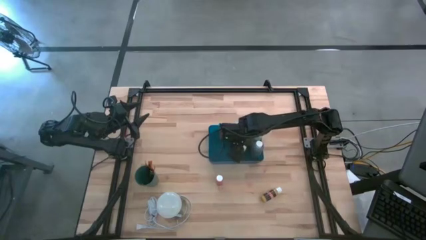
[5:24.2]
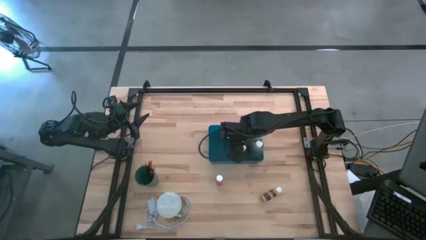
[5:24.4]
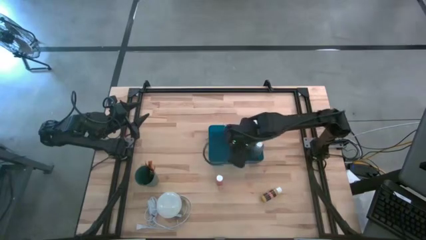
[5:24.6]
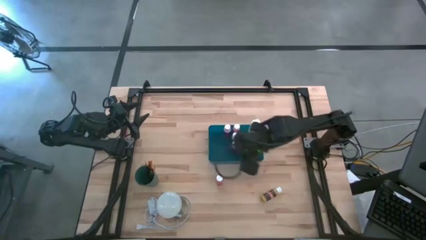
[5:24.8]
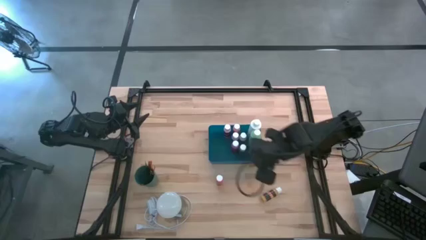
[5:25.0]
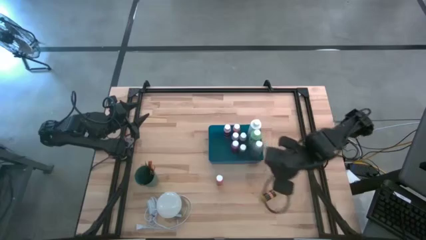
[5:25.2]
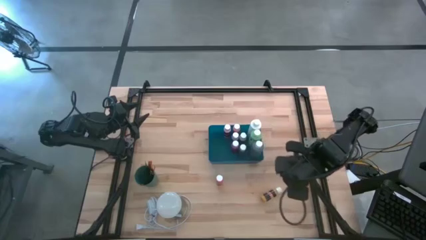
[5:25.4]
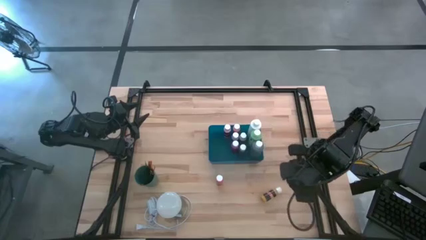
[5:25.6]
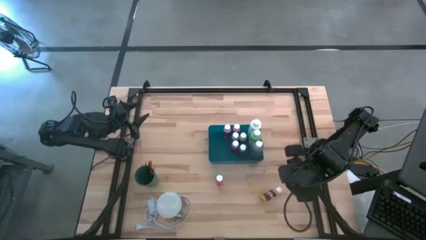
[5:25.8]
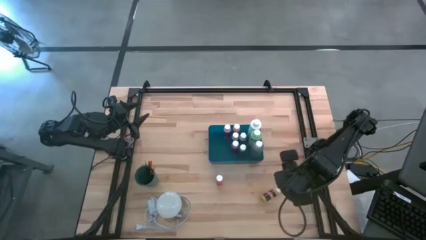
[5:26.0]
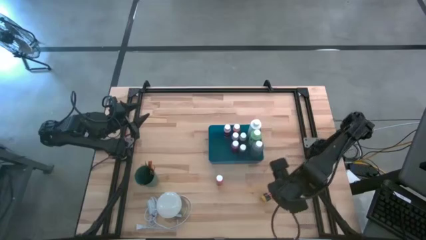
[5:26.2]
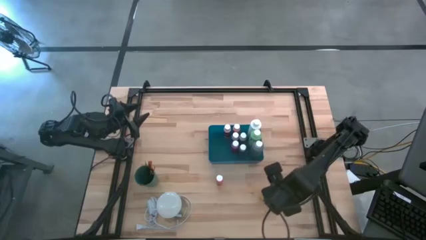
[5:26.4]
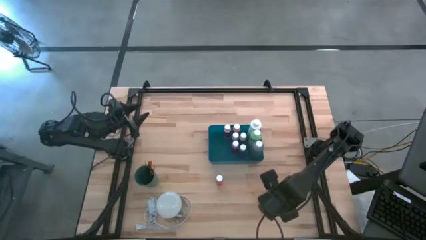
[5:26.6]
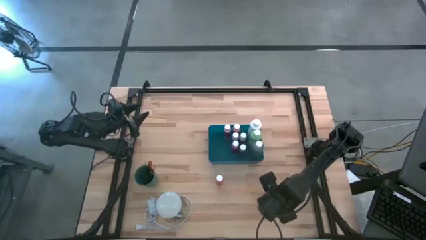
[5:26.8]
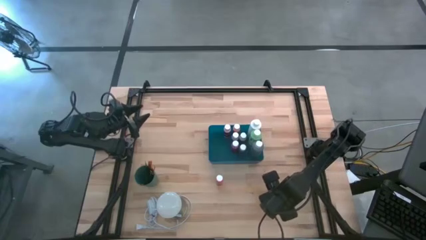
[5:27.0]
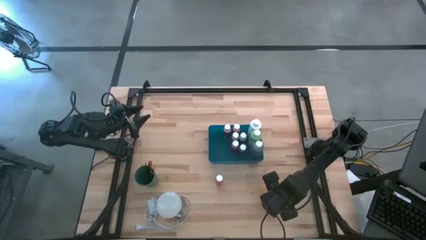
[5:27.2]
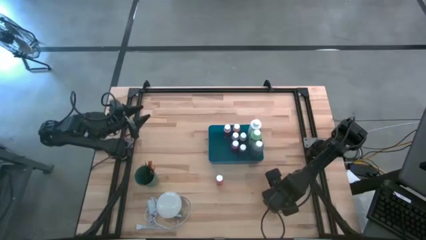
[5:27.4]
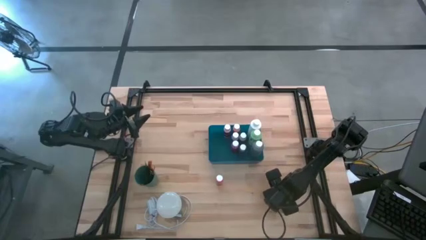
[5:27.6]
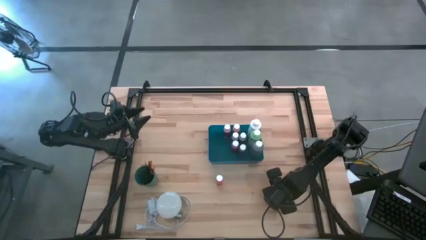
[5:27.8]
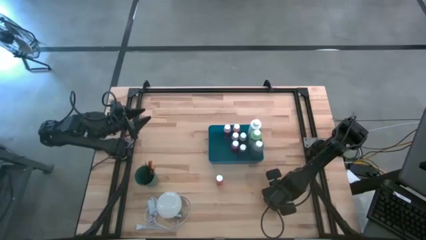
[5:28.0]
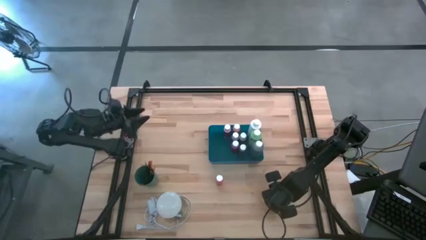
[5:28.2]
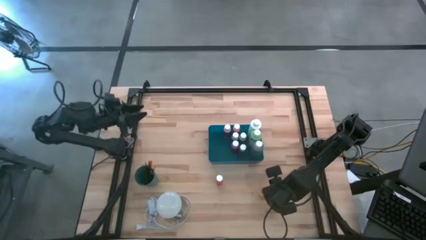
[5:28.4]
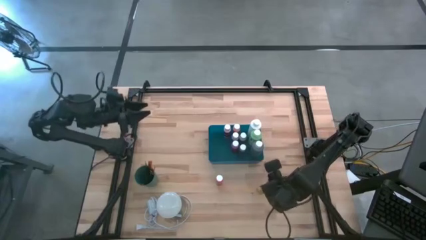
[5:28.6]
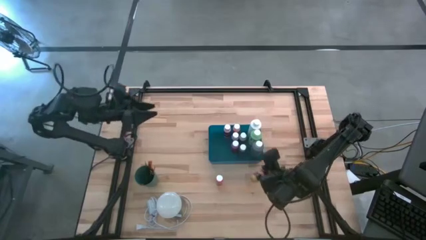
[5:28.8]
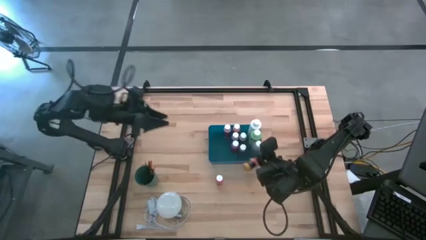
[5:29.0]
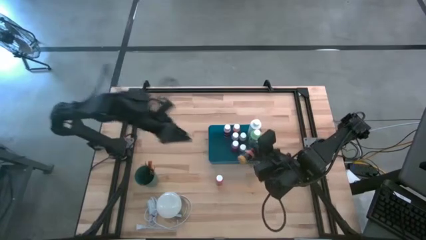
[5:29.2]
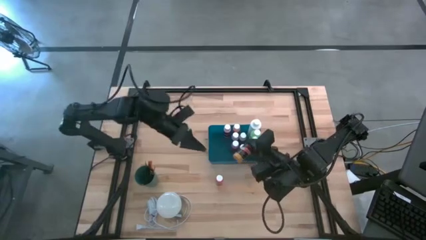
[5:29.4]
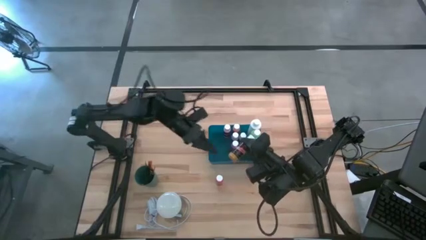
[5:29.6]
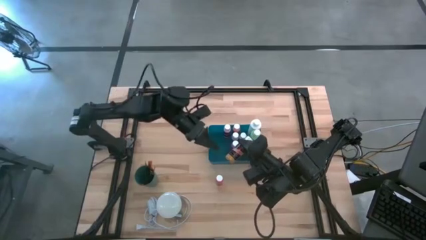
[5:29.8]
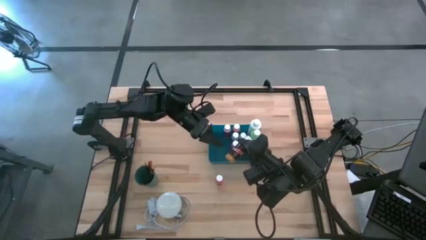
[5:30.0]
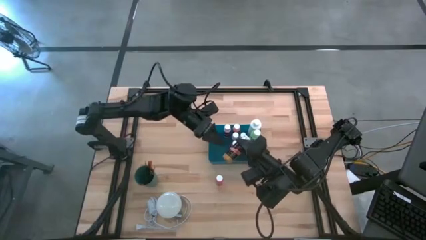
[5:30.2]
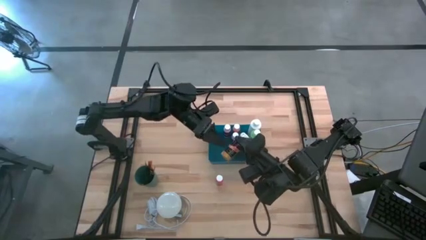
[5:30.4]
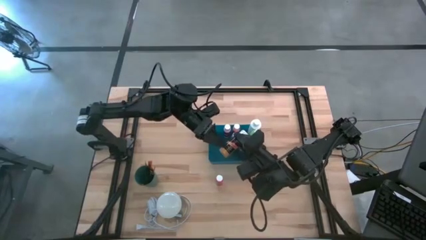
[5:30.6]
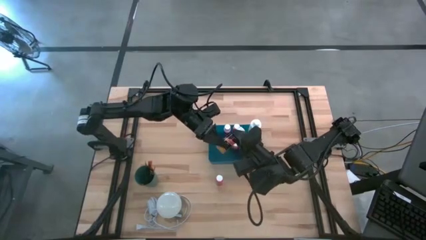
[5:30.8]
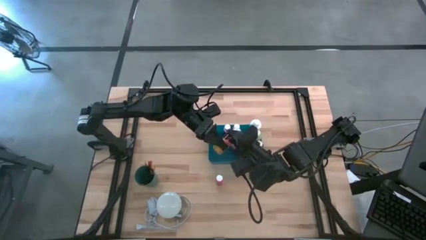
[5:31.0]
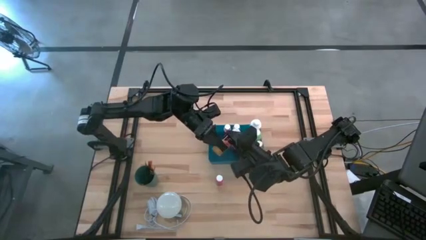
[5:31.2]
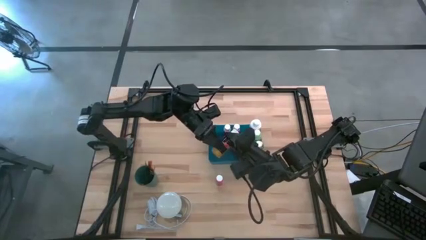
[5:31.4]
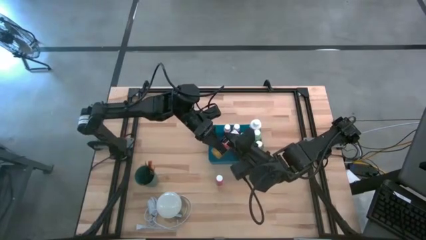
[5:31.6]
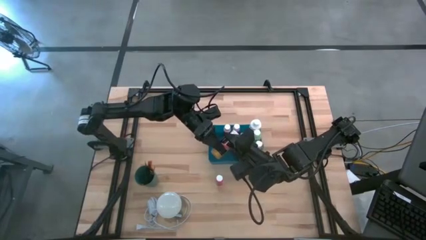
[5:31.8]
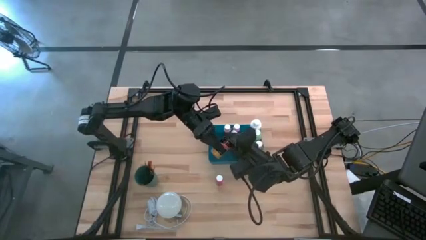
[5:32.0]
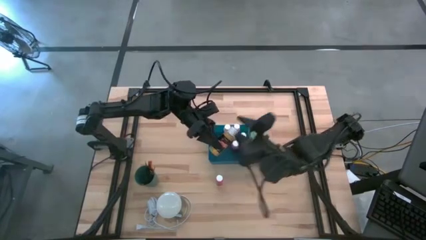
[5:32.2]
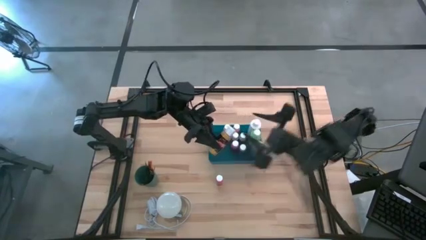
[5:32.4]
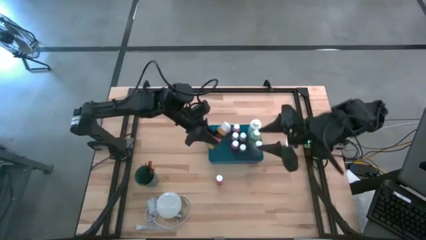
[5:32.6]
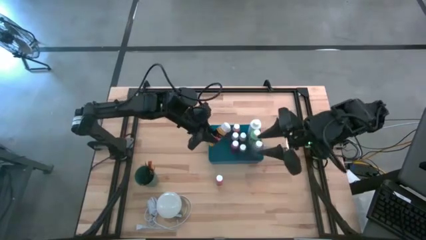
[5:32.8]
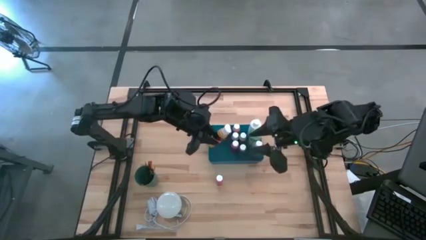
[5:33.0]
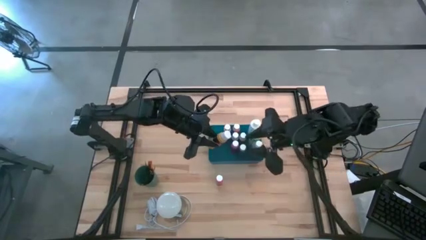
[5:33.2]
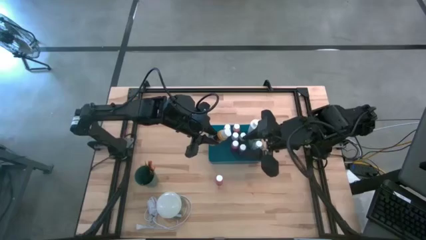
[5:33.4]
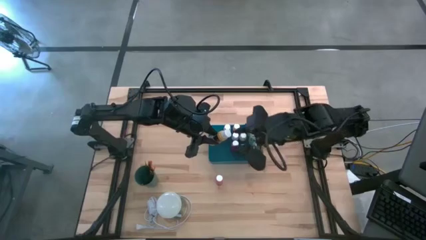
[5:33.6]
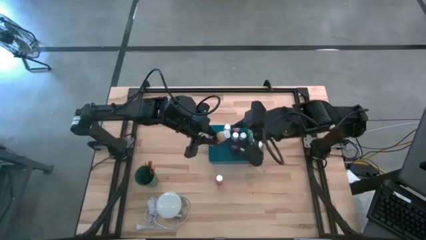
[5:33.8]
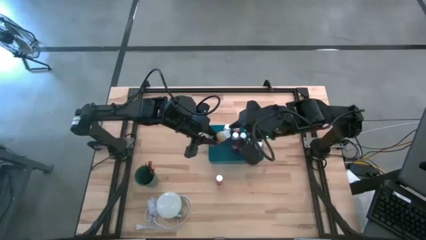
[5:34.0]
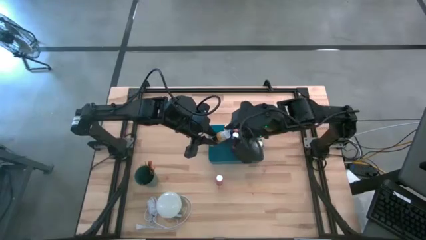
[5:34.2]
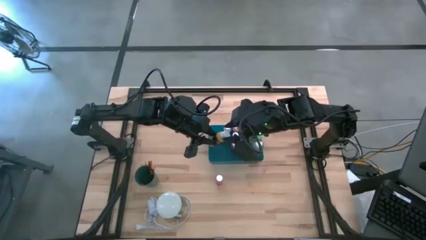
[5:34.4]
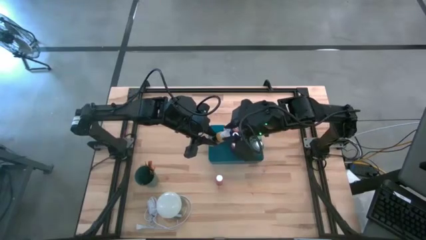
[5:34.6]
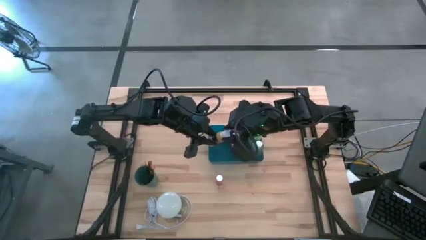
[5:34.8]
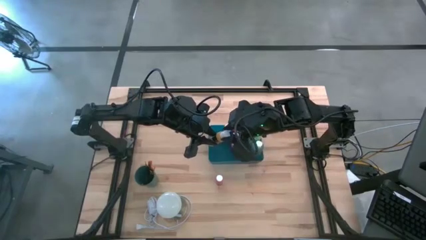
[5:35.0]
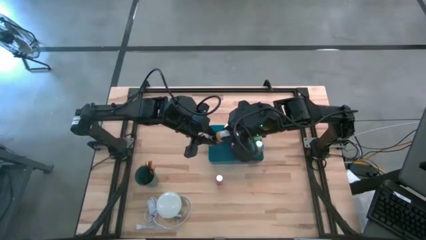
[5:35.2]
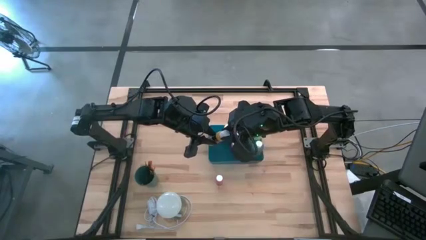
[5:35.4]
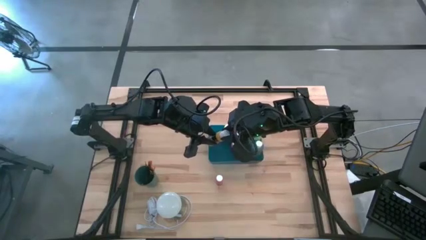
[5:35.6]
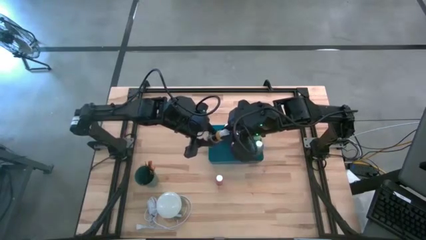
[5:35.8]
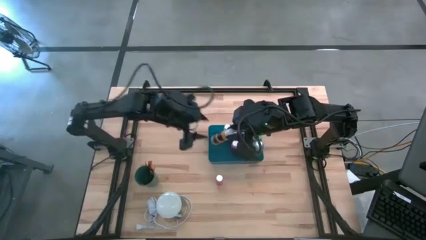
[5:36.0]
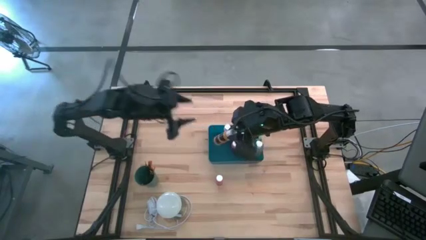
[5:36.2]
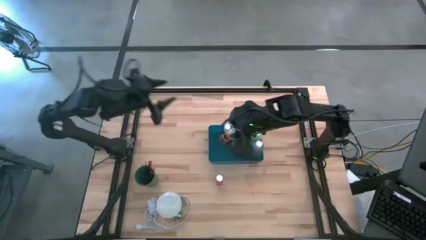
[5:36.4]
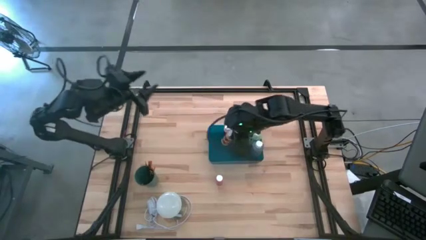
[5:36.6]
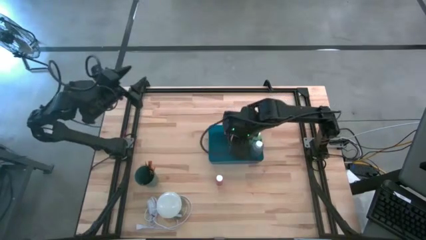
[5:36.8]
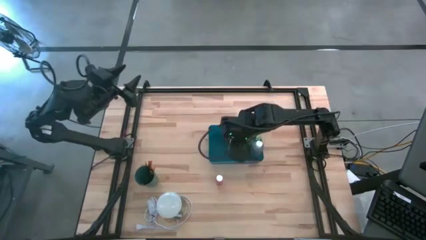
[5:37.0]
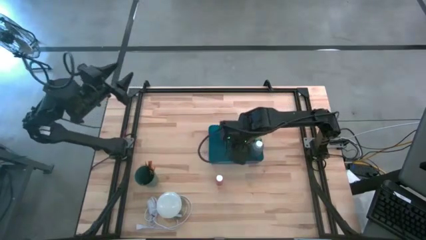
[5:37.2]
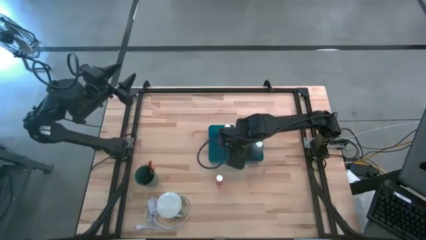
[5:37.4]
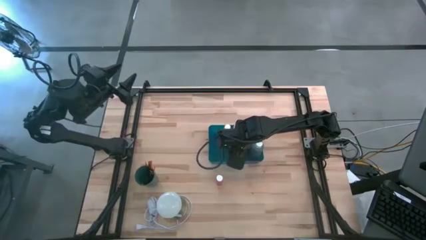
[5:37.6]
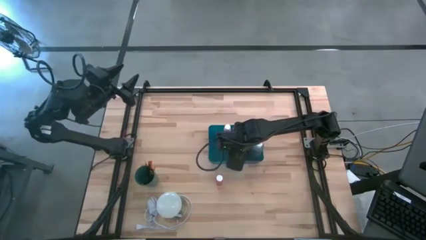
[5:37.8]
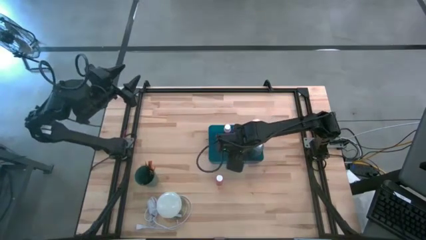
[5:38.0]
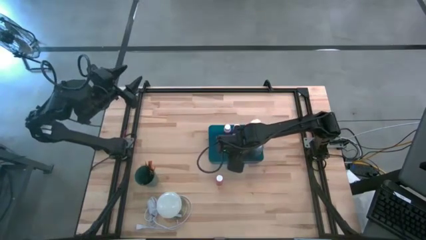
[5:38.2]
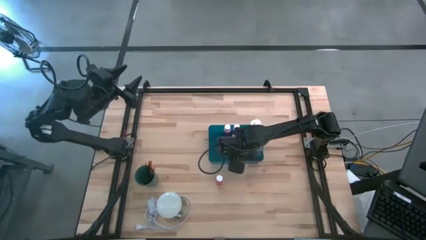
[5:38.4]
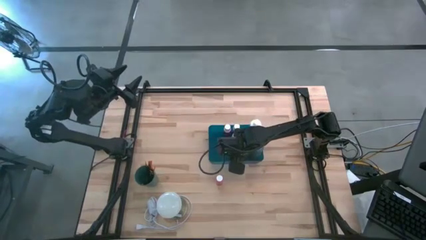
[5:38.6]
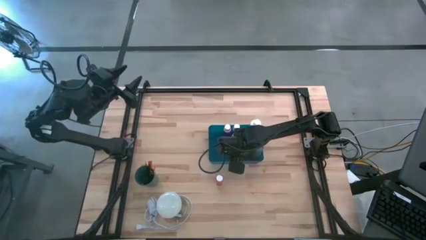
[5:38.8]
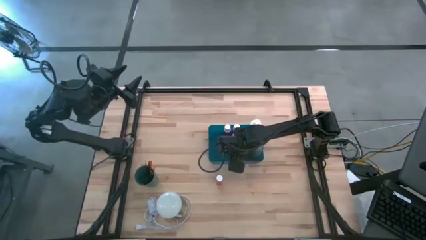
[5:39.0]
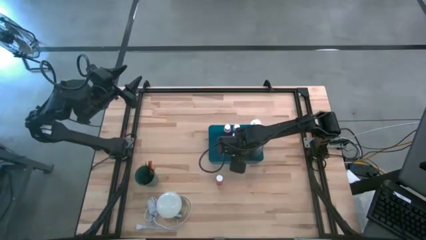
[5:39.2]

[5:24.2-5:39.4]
Task: Pick & Place Paint Supplies
Put the yellow paint bottle into the blue bin

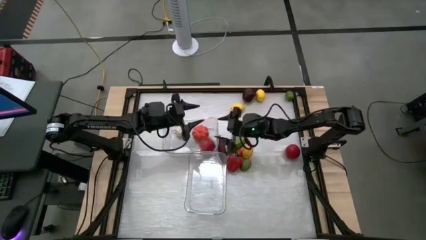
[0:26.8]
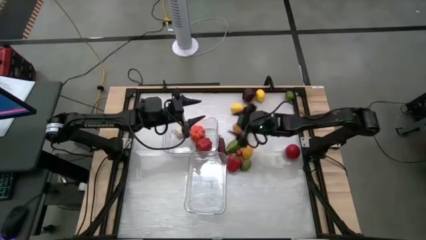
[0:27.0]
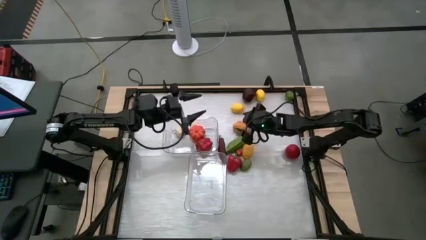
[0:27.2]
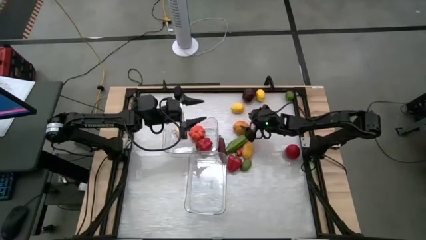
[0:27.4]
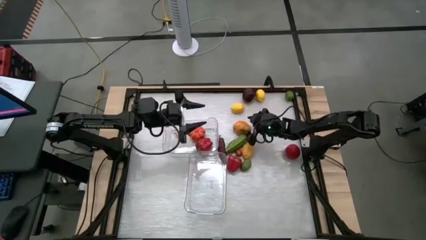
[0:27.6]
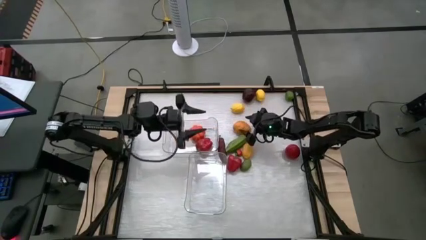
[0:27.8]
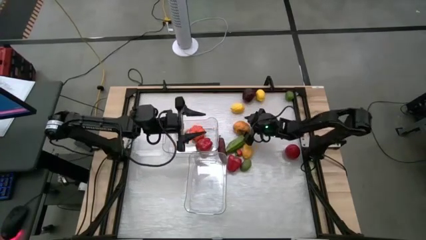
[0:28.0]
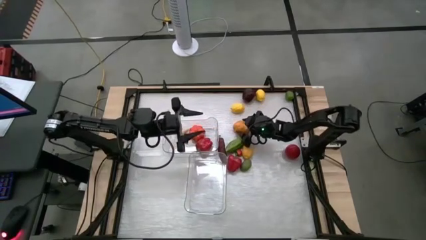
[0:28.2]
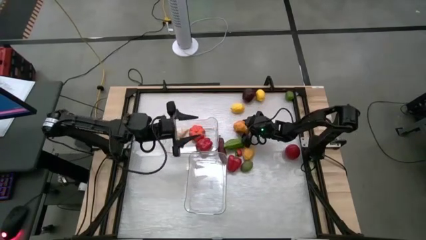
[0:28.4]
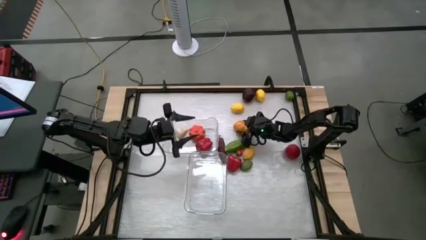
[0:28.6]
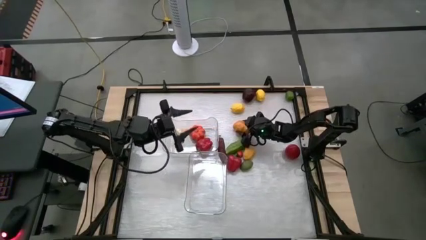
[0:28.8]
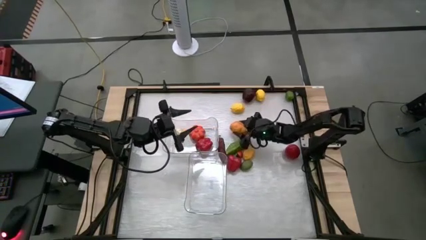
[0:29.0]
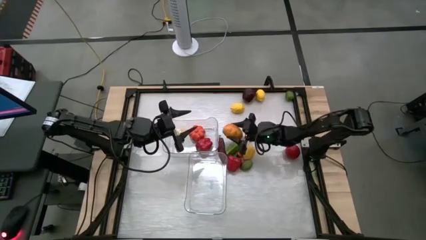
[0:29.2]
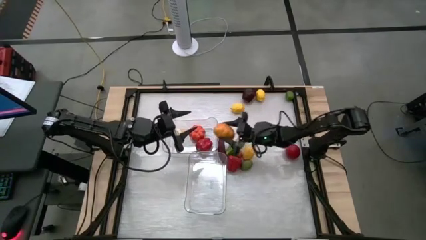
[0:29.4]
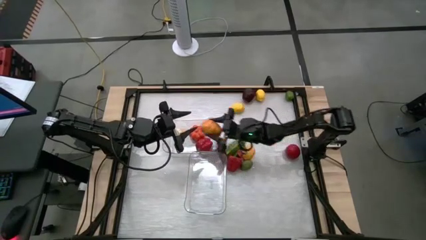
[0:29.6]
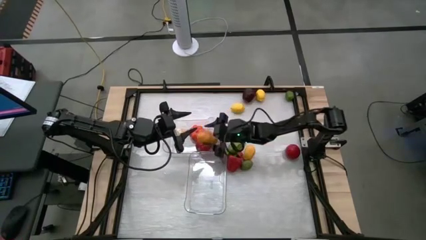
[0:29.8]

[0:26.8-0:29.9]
Task: Sort produce into baskets
Put the potato into the top transparent bin
